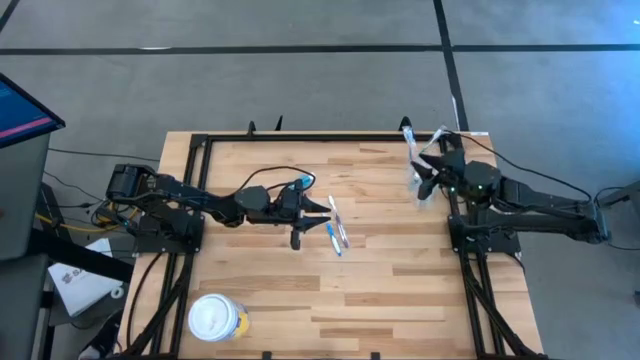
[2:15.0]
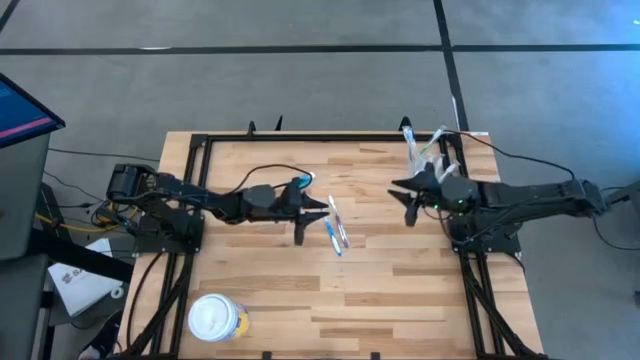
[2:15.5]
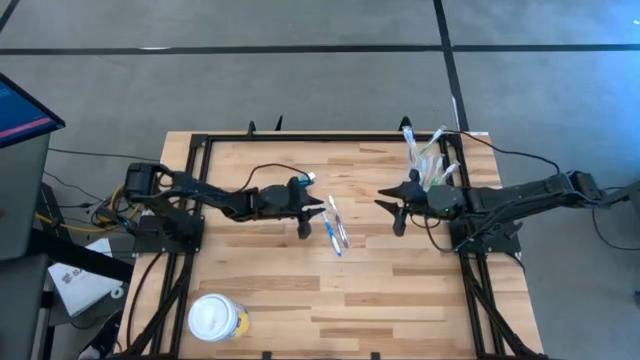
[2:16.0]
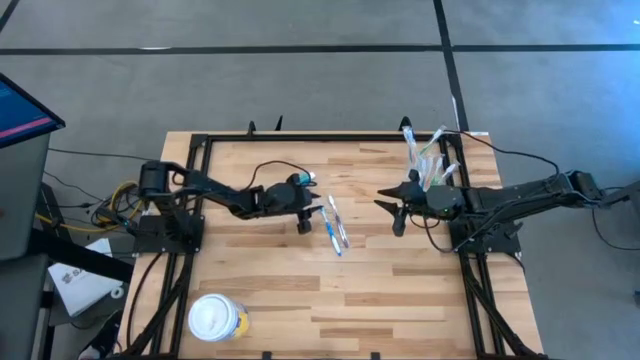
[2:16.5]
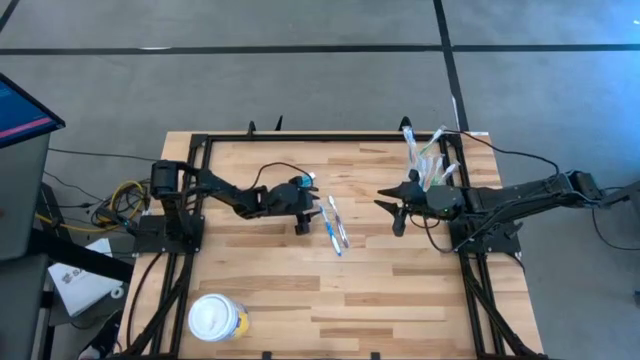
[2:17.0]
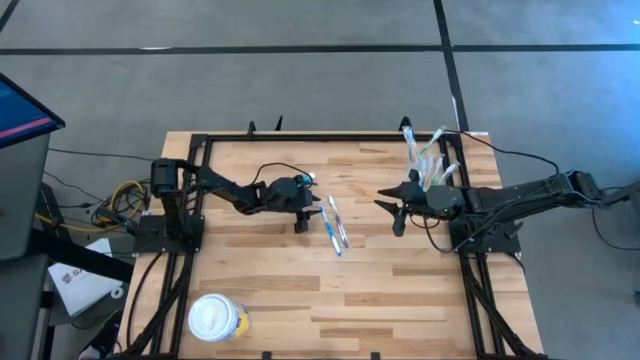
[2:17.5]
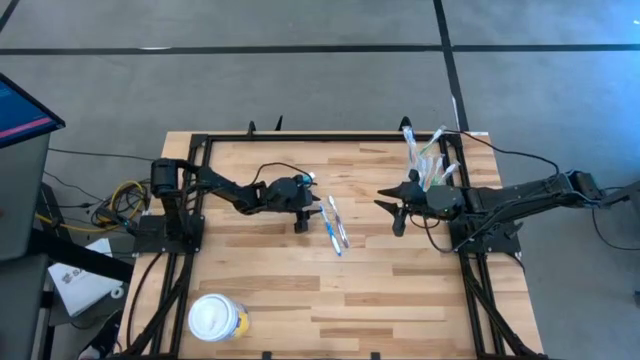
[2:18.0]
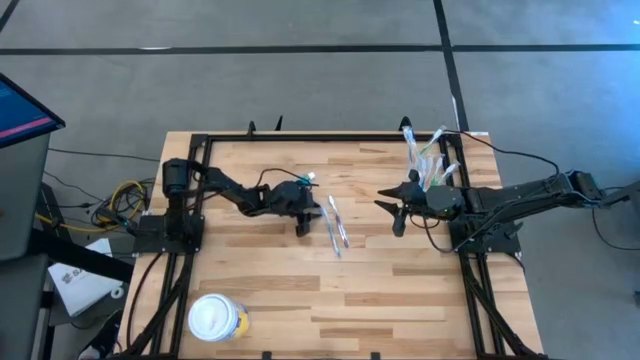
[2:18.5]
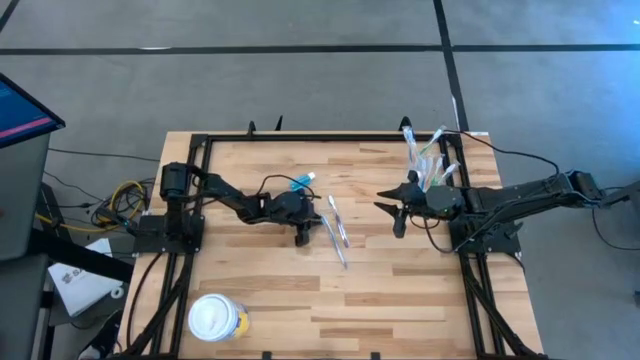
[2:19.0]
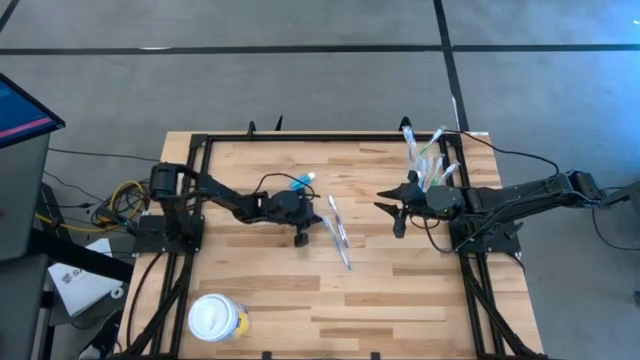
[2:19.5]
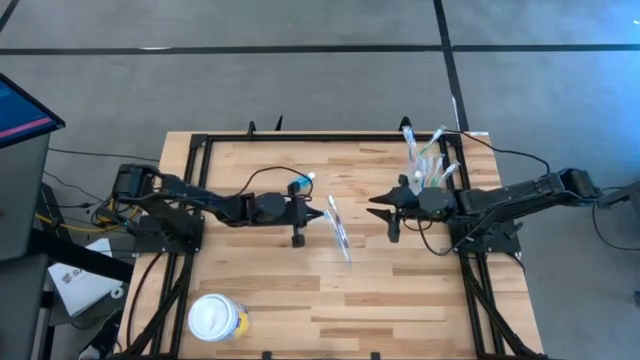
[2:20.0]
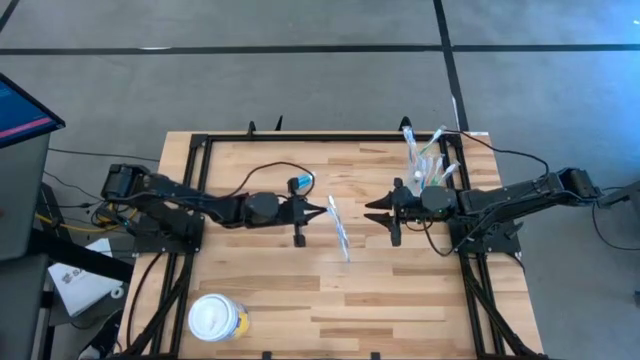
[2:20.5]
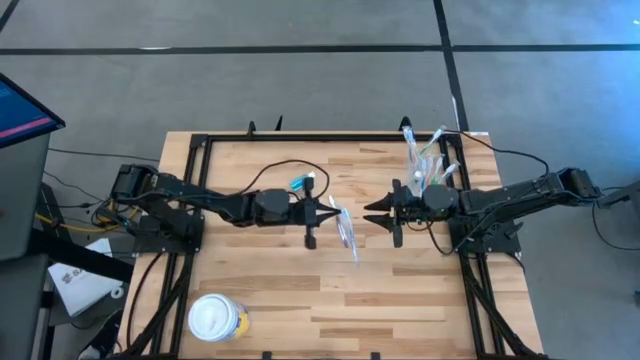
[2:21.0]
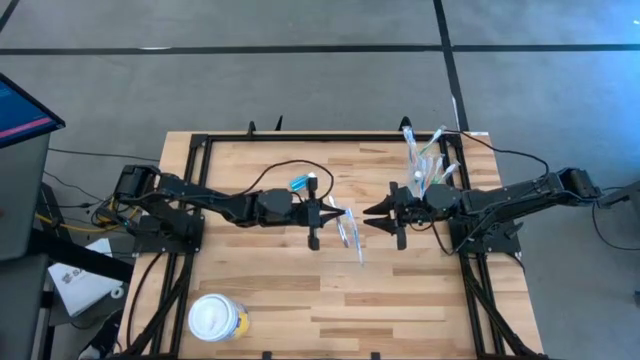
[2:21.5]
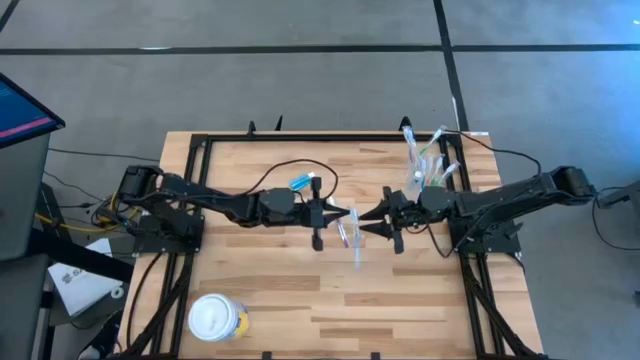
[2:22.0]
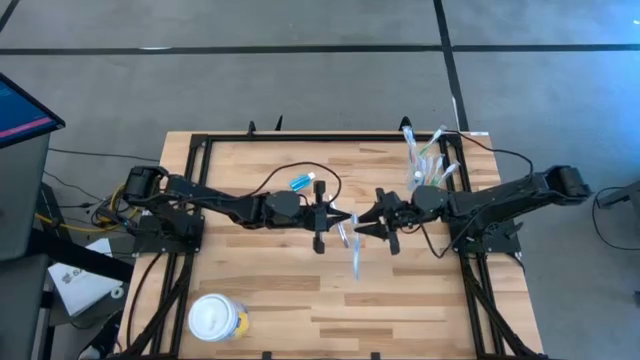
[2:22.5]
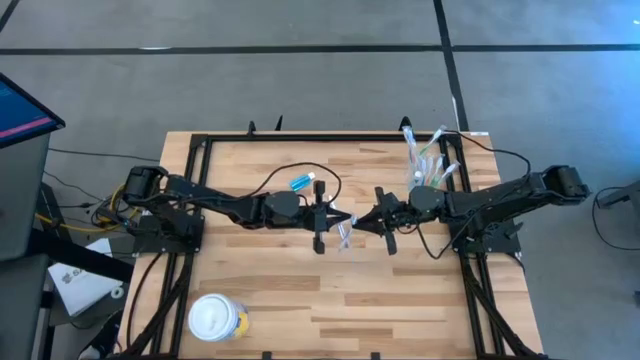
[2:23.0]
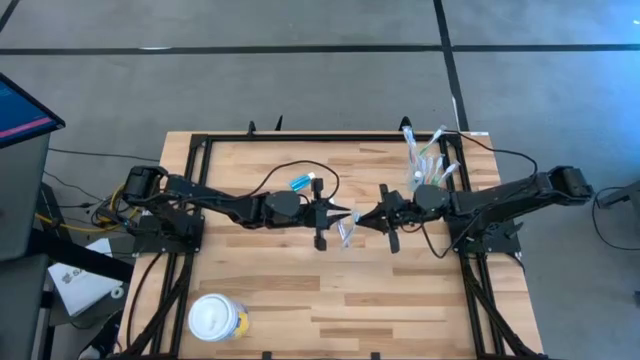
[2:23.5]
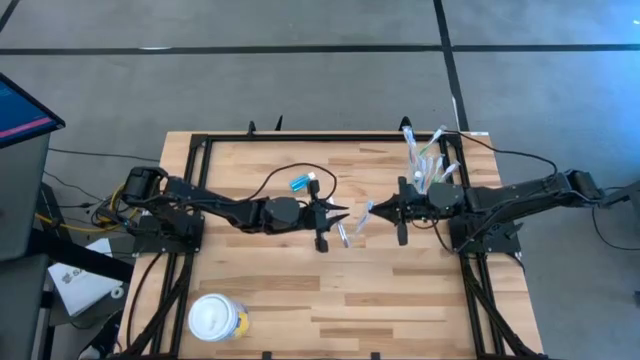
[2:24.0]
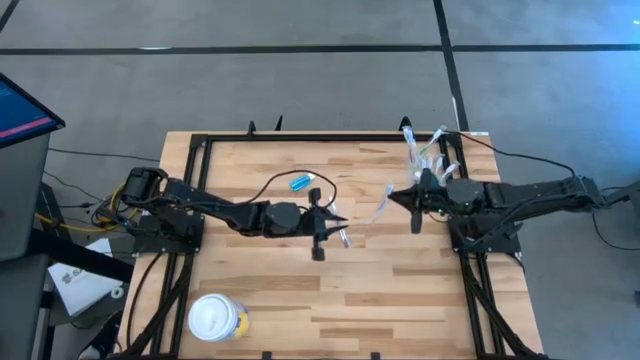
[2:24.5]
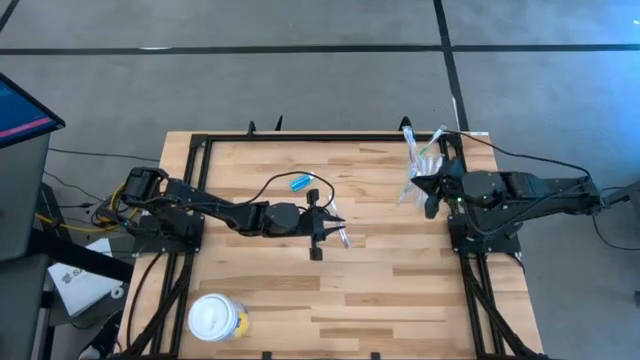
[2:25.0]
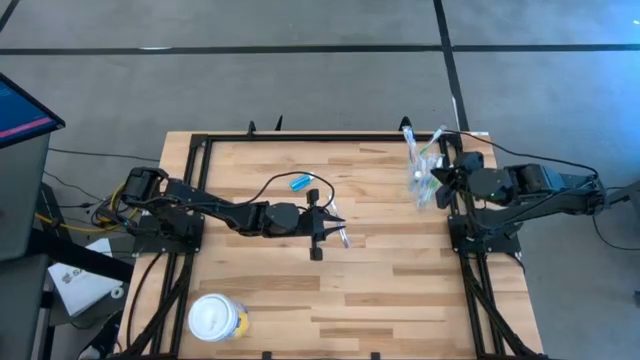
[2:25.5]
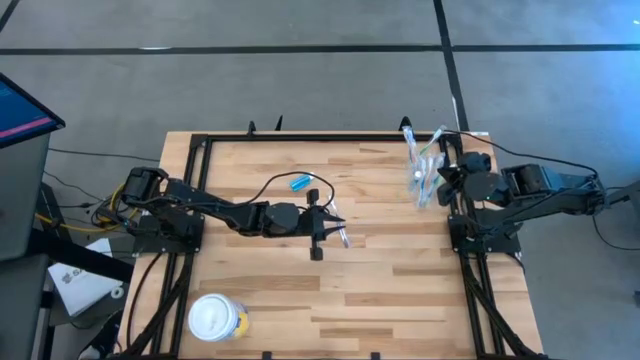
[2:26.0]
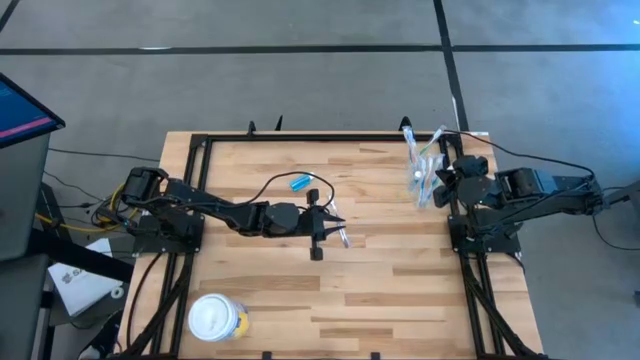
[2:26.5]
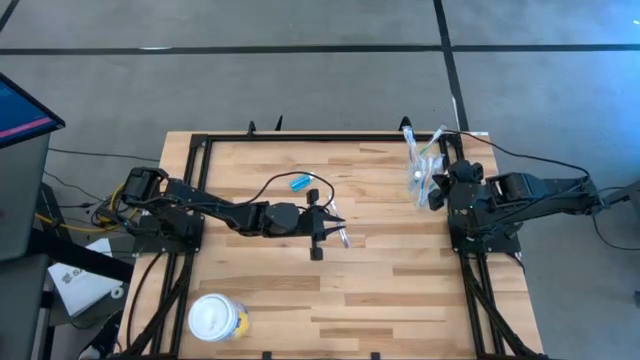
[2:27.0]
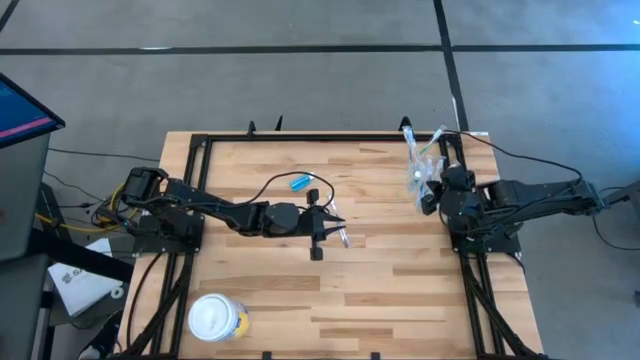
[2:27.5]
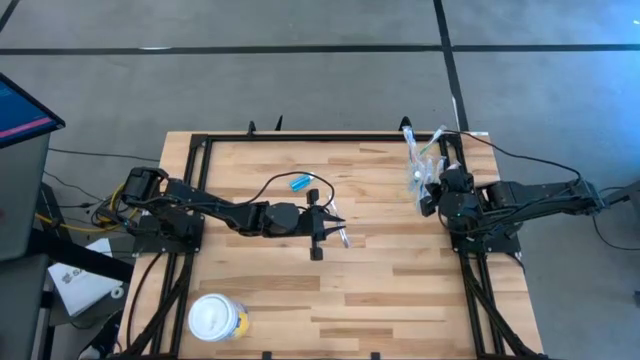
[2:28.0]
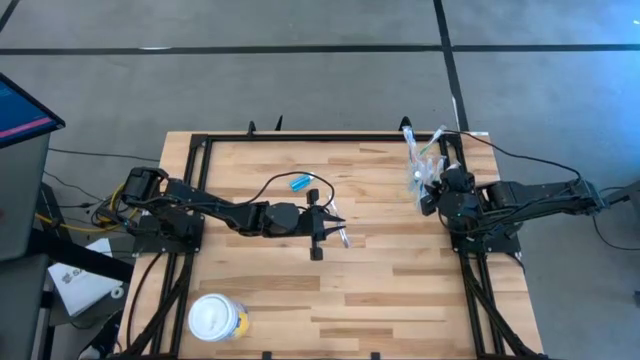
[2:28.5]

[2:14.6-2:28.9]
Task: Pick & Place toothbrushing station
Put the blue toothbrush into the transparent organizer

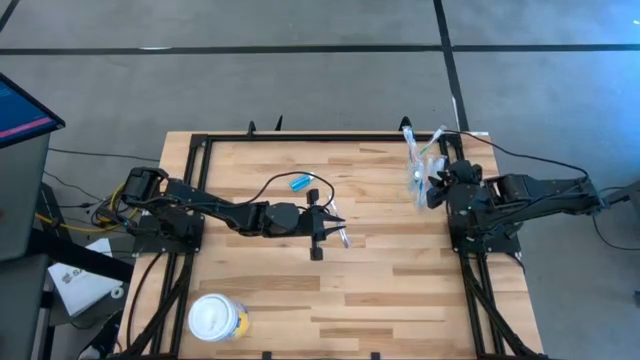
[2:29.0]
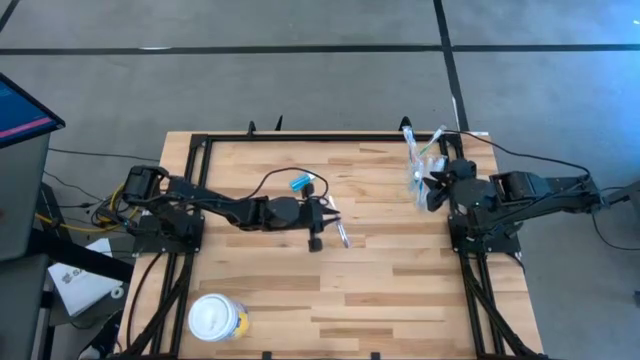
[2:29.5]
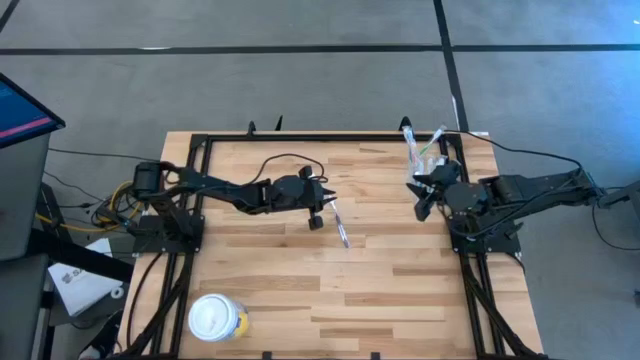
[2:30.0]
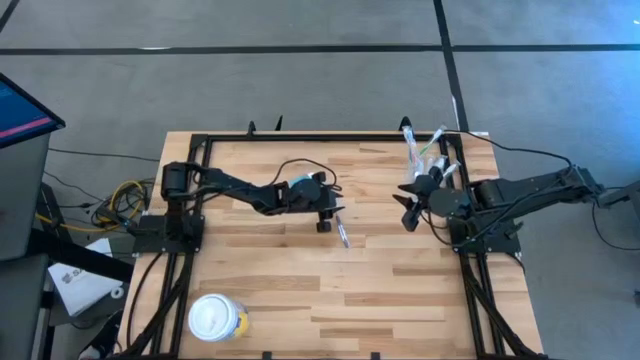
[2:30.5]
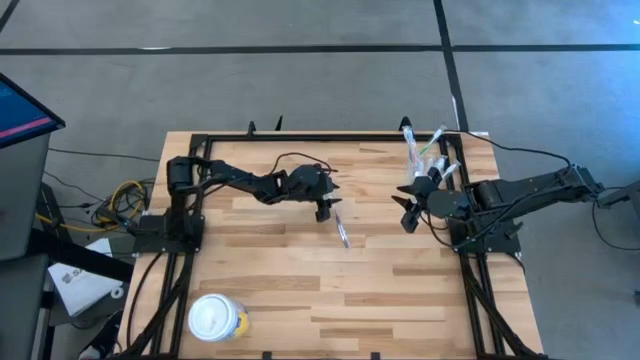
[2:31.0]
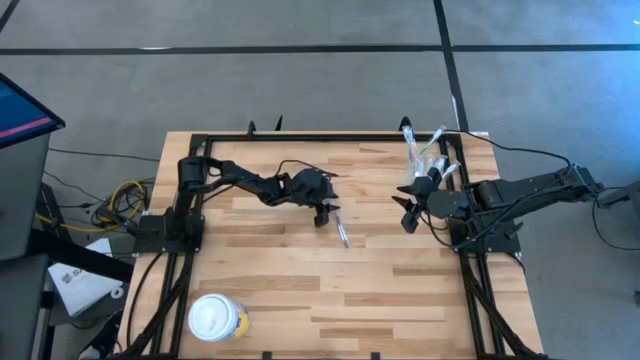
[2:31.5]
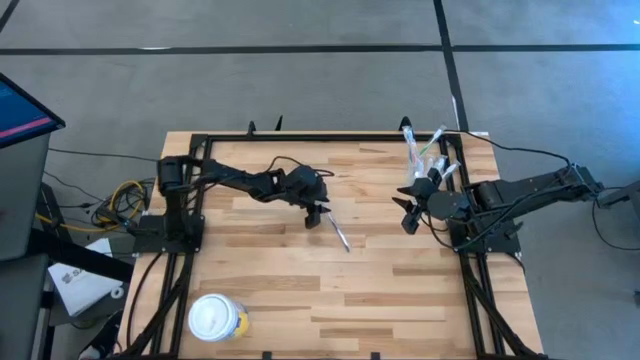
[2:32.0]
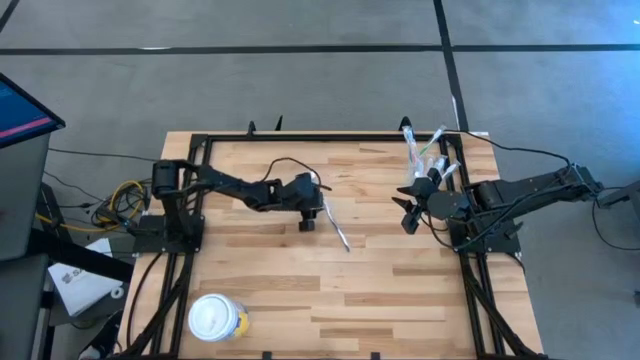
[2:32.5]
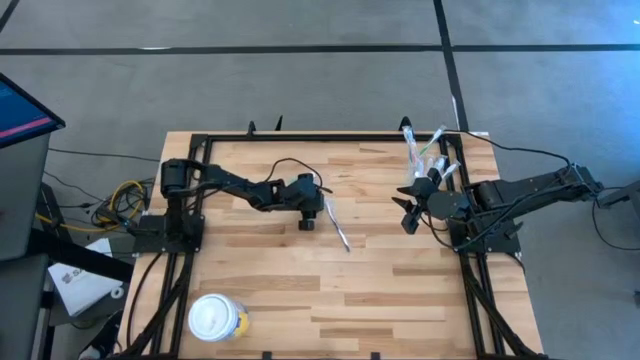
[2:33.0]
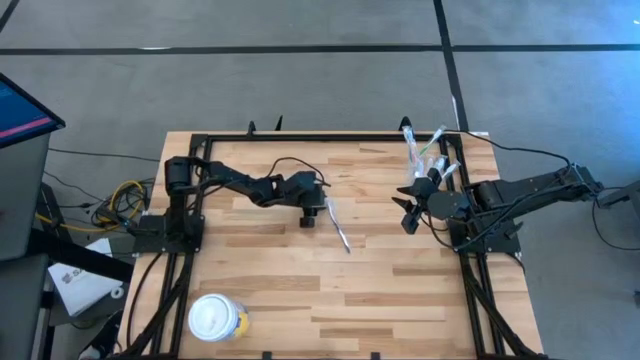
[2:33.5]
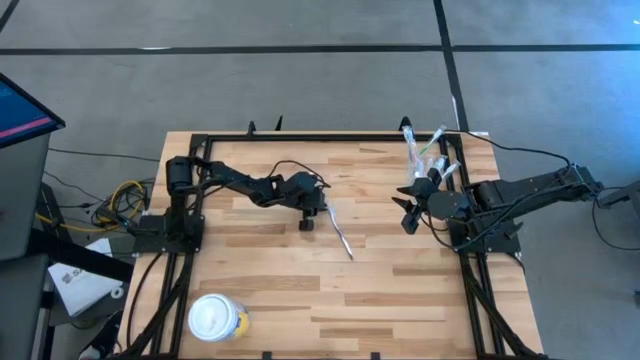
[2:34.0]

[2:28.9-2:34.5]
Put the purple toothbrush into the transparent organizer

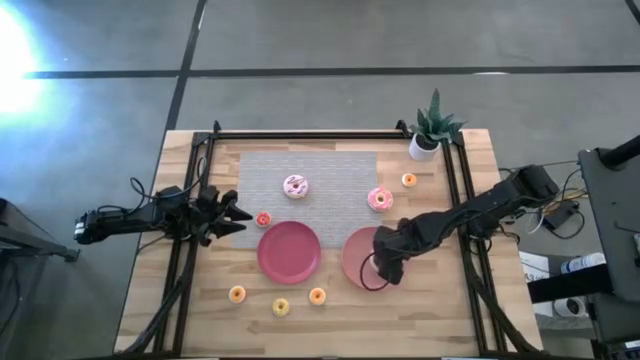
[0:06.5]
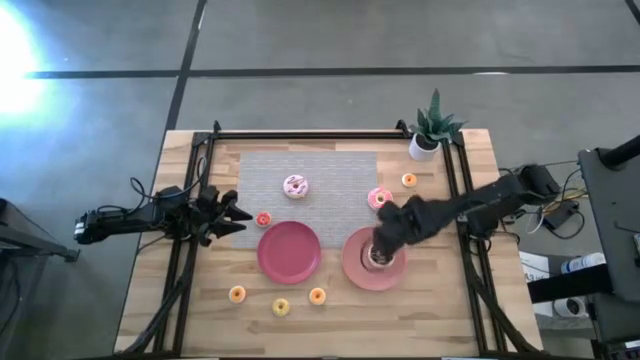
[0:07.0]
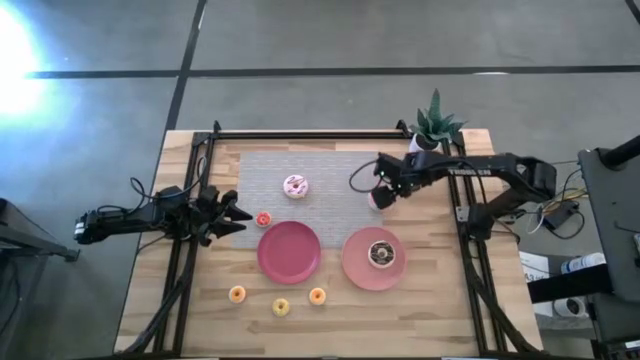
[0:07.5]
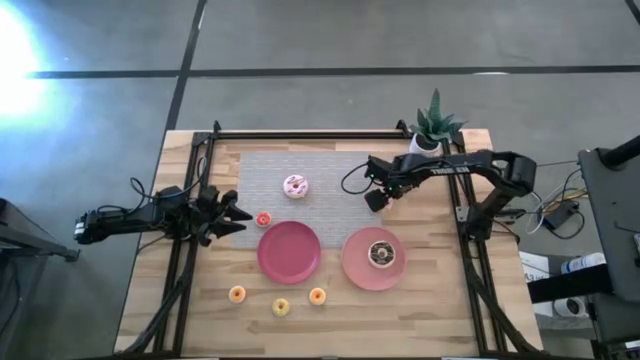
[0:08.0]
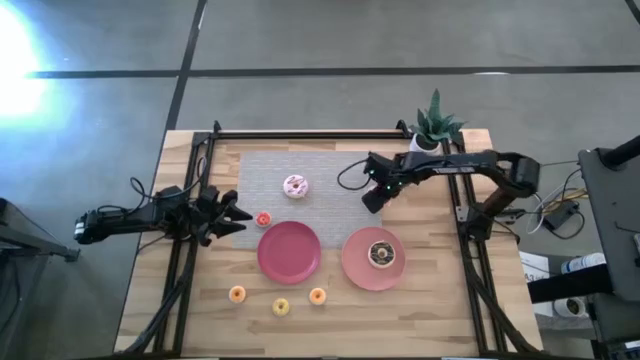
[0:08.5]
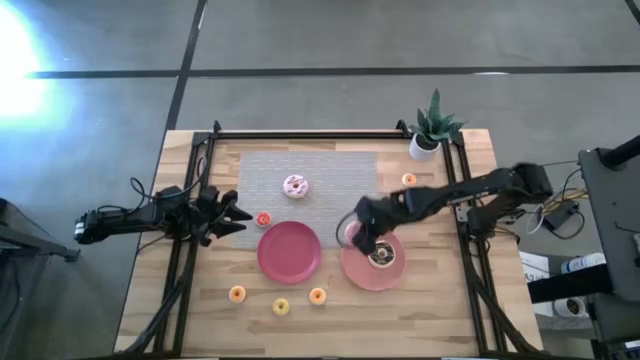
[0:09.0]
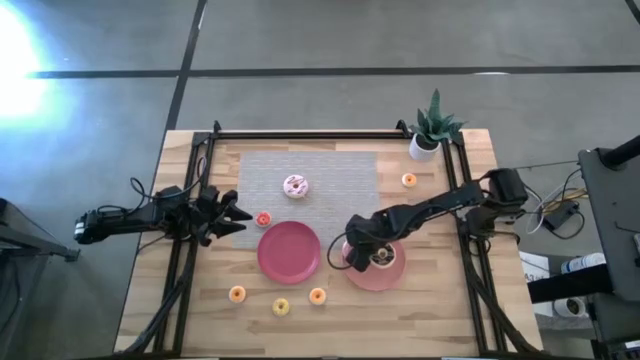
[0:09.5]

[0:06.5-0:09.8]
Task: Pick & Place donuts
Put the pink big donut on the light pink plate
